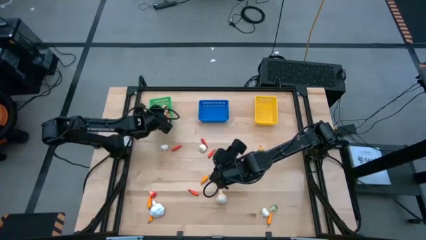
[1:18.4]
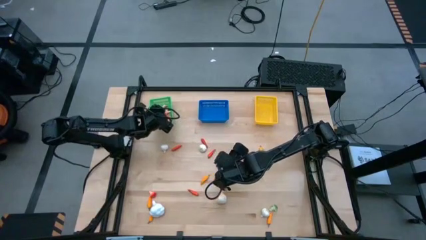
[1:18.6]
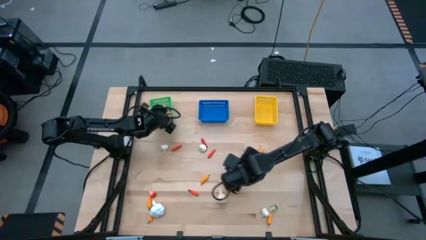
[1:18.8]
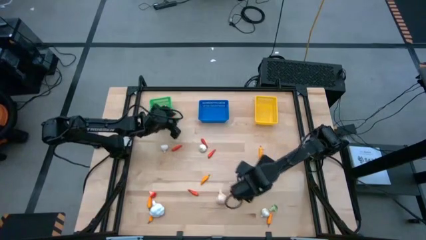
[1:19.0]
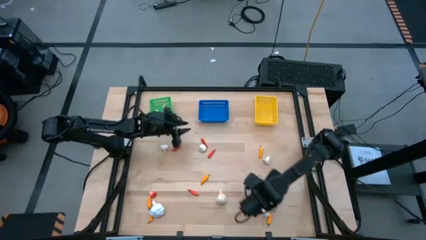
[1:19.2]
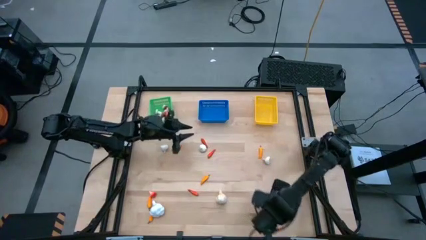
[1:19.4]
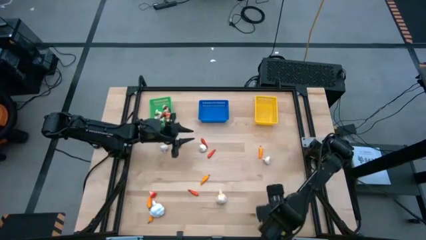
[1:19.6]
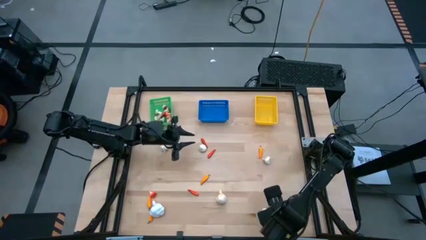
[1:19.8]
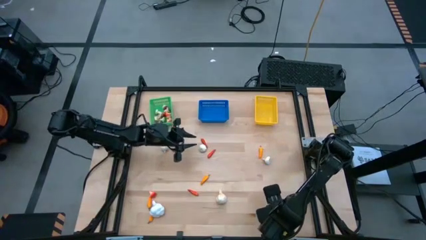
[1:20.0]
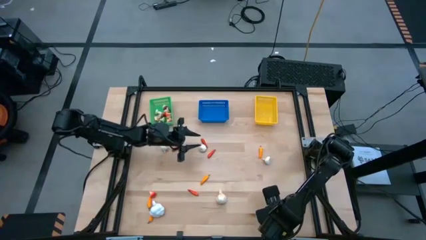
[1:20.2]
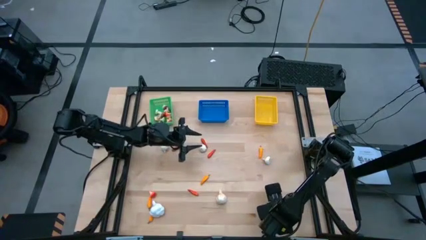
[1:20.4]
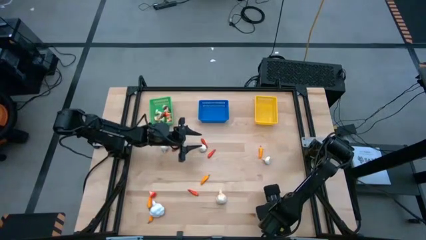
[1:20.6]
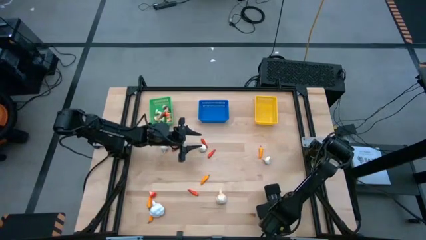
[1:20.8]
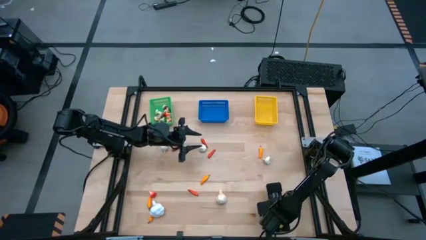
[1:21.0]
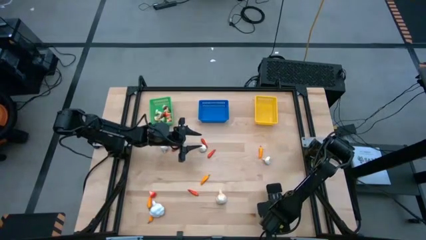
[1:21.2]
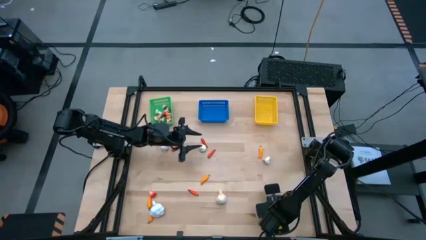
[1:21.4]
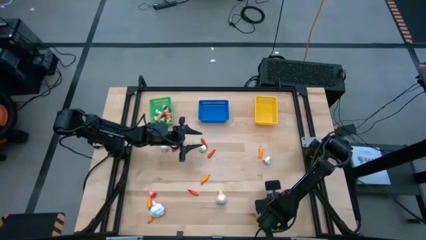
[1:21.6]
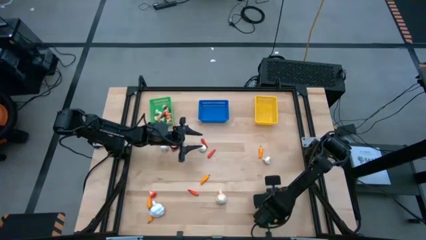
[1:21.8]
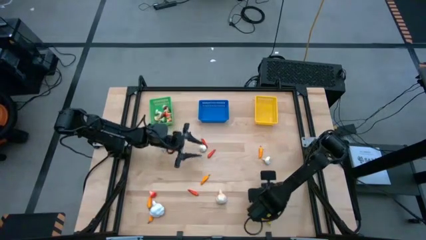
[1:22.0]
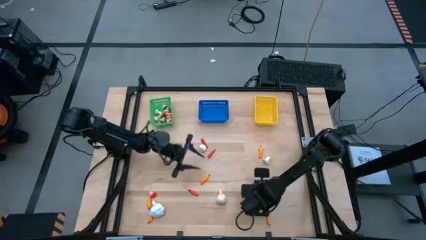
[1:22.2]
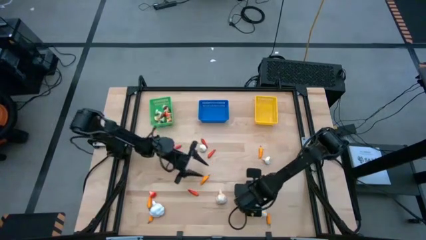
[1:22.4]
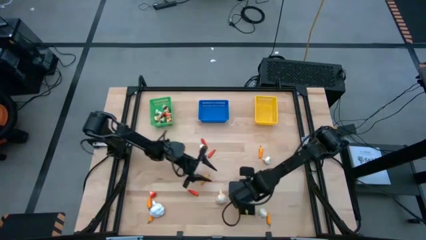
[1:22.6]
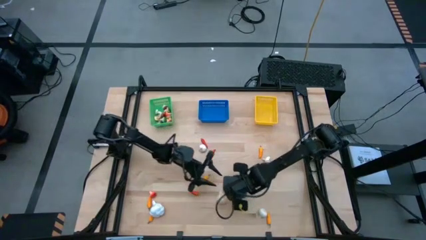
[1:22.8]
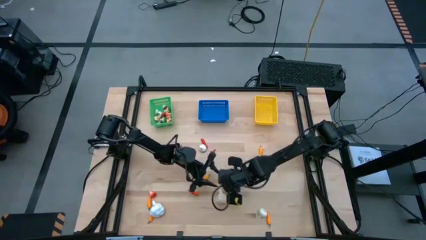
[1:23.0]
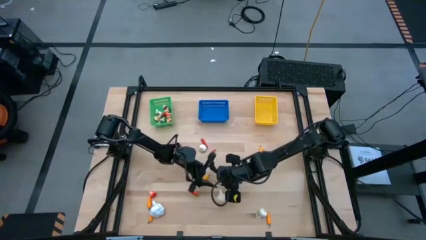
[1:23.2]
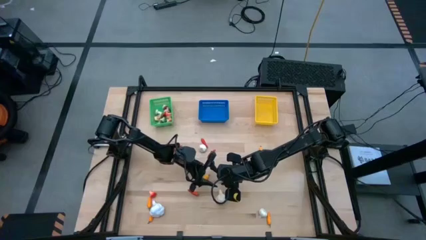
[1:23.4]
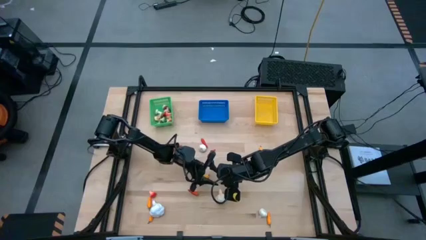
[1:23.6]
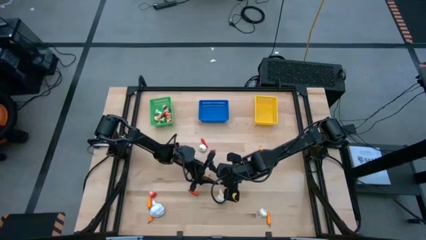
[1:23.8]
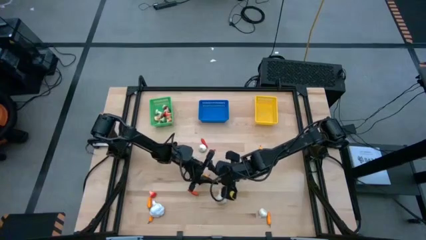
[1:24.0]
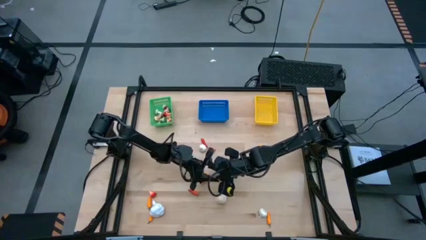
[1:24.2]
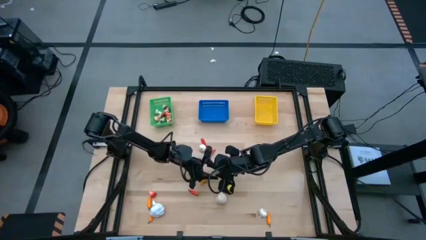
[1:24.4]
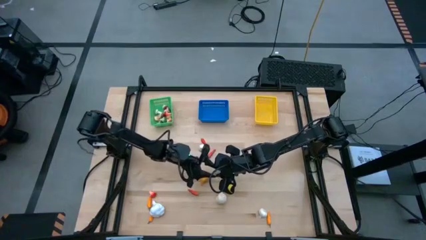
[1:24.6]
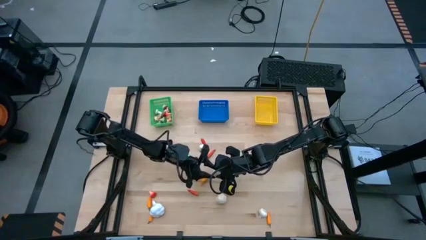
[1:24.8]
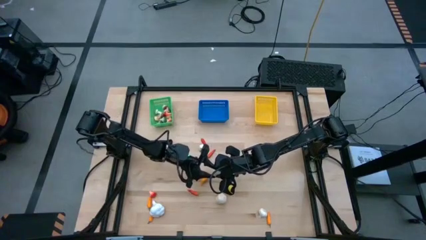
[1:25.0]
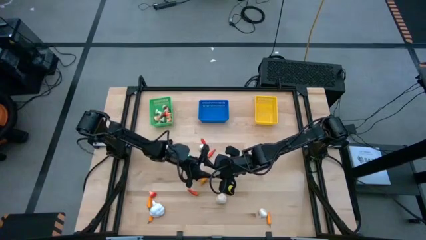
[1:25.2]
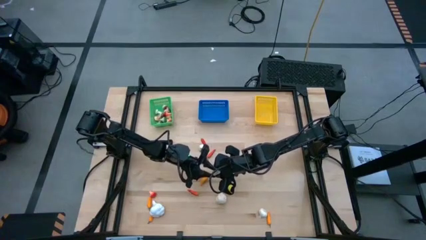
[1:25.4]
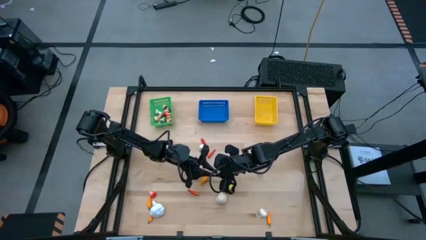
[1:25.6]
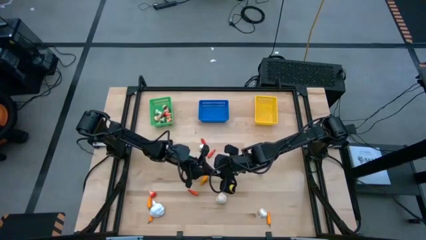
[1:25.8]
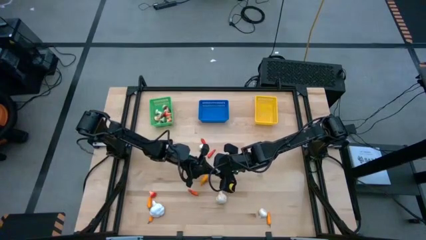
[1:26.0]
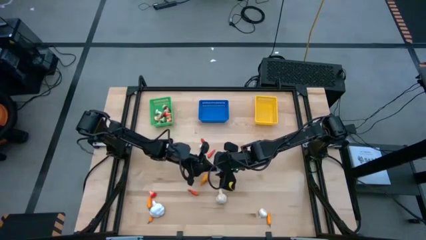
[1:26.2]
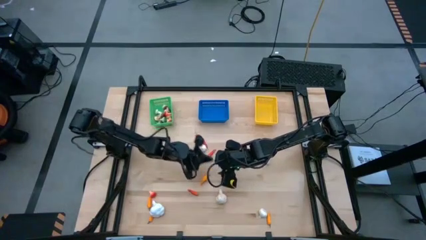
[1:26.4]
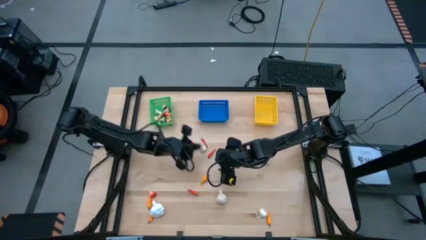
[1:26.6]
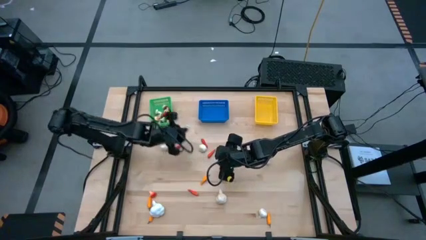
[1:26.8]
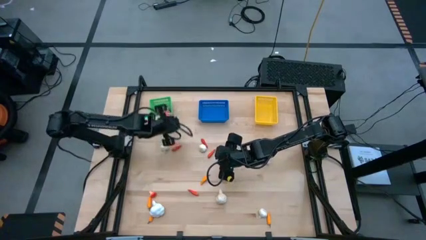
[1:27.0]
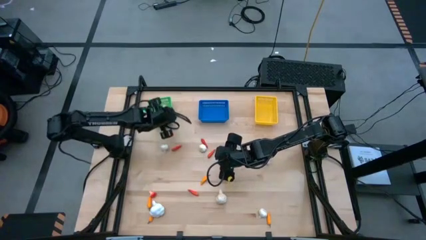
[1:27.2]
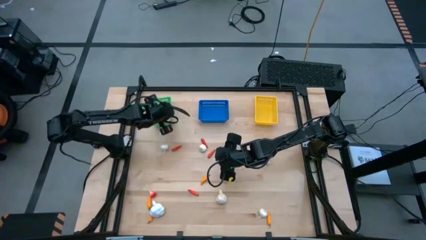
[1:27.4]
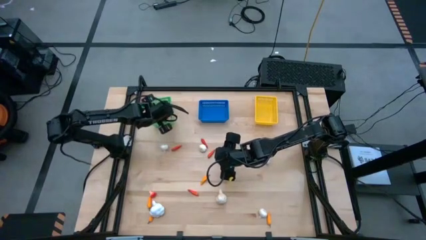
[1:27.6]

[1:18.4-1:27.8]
Task: Sort produce into baskets
Put the green mushroom into the green bin

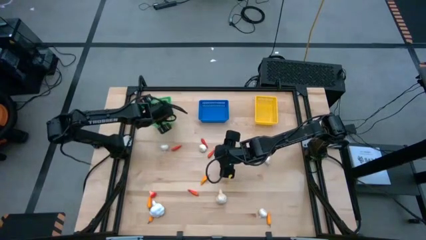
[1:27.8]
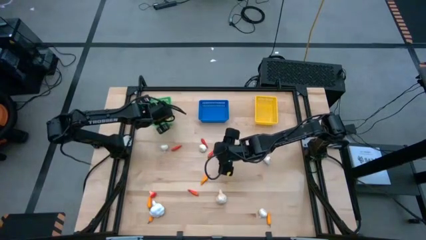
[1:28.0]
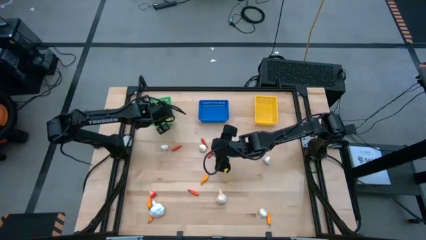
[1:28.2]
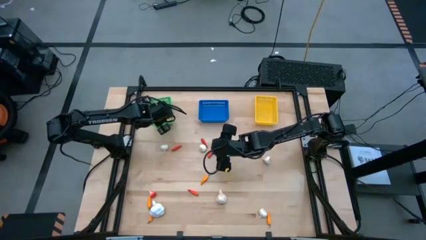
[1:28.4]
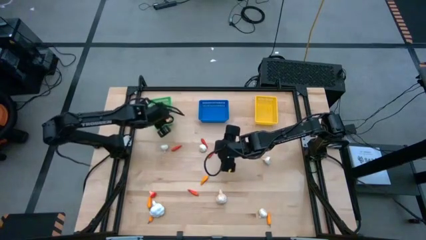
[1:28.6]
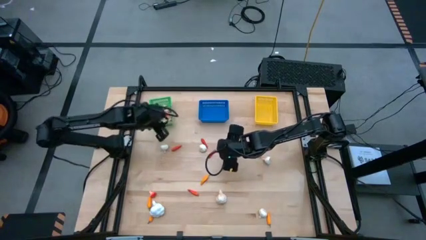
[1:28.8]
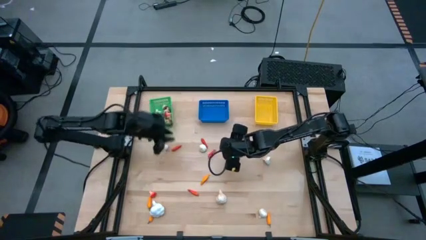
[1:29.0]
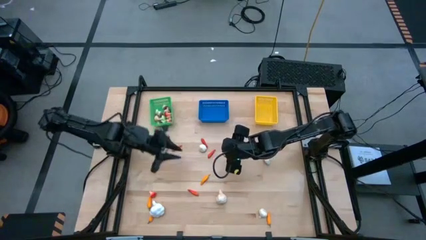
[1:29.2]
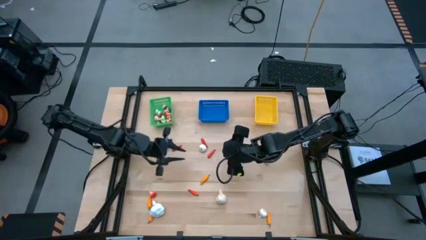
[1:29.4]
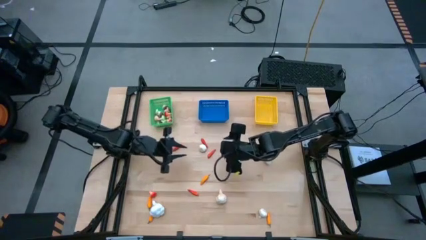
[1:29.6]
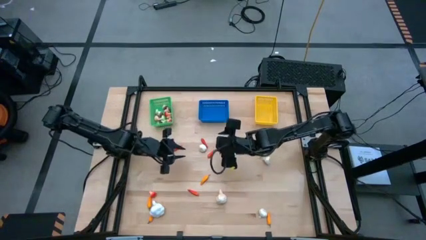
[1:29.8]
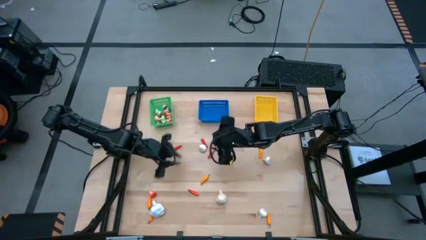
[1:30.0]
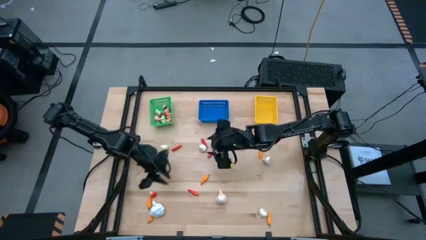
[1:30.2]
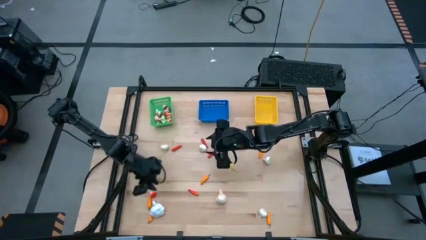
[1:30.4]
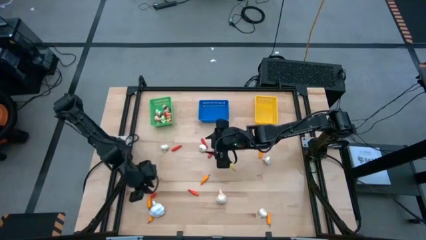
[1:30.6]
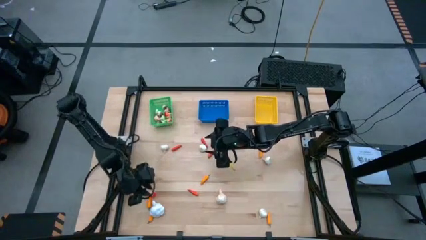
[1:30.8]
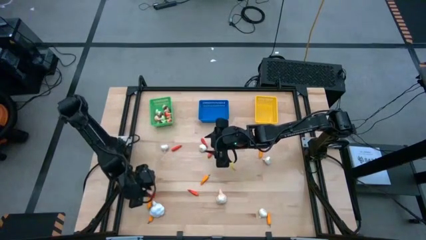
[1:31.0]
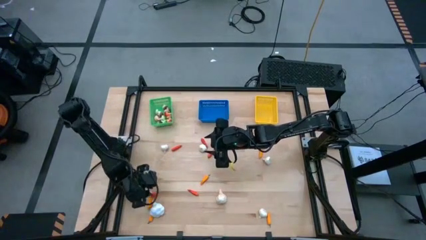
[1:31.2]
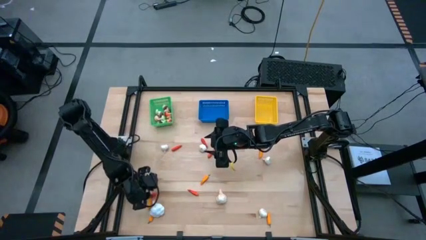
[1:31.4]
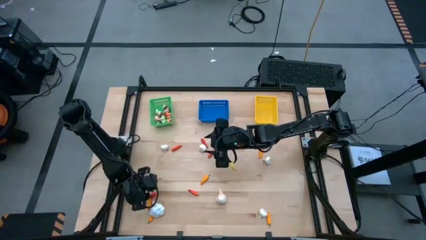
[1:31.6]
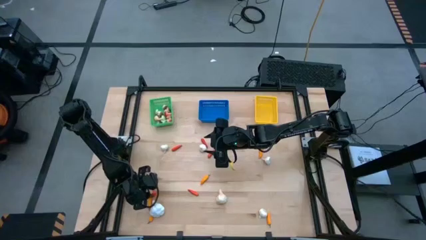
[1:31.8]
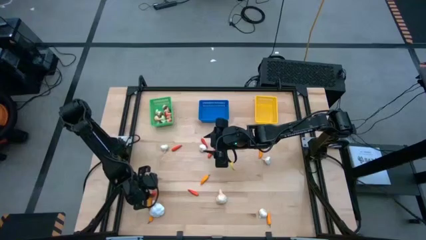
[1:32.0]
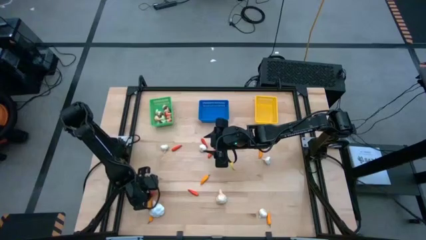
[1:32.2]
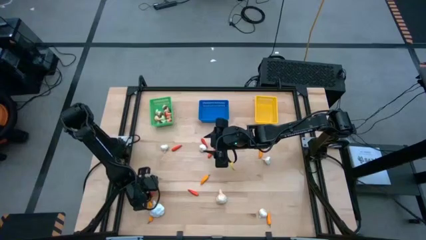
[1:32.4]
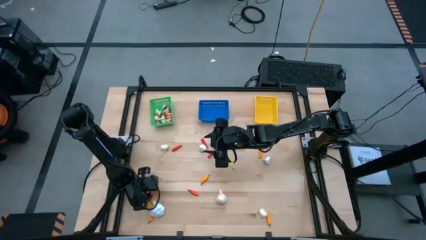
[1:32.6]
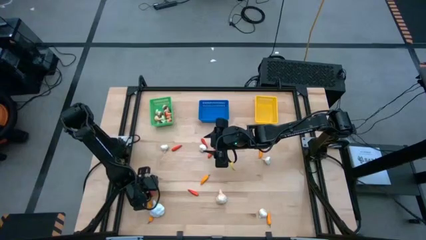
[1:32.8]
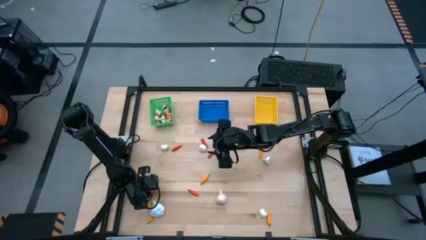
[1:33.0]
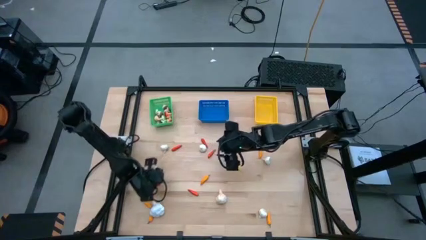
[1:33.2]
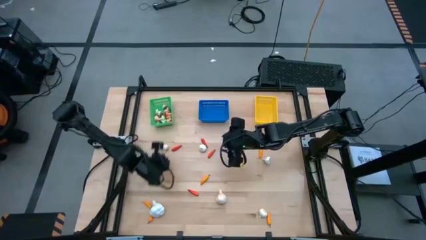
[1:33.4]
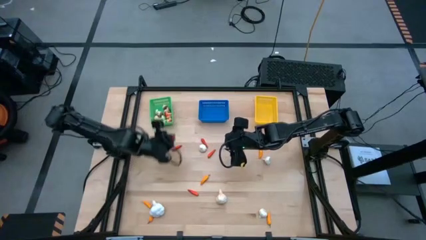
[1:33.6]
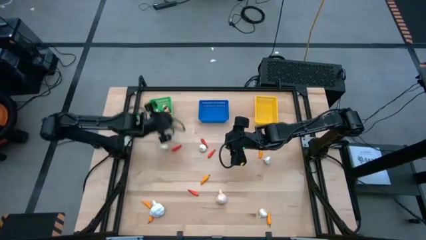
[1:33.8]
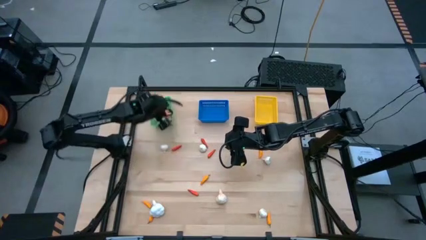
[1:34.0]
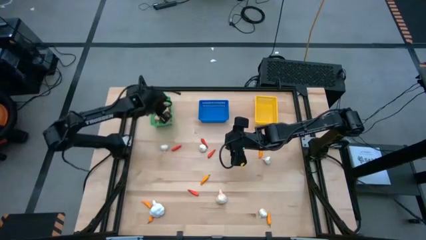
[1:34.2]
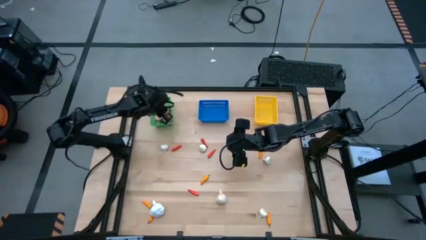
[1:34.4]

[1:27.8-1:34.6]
Put the orange mushroom into the green bin
